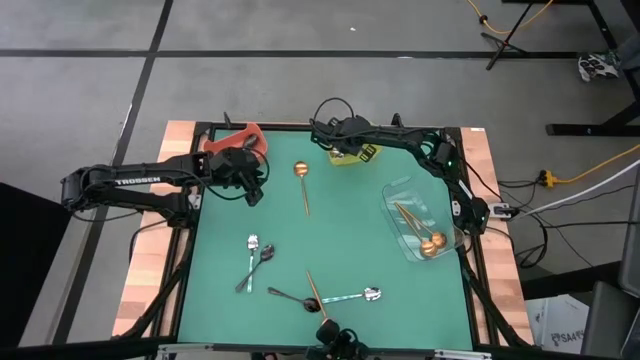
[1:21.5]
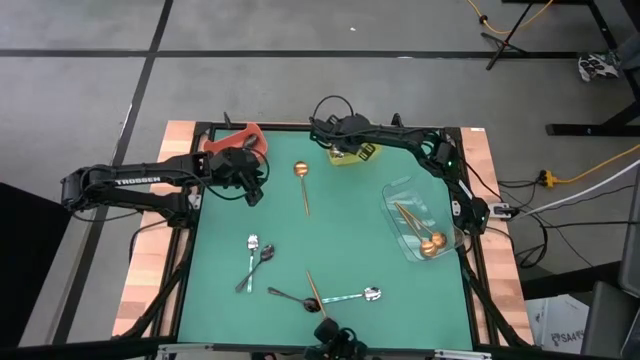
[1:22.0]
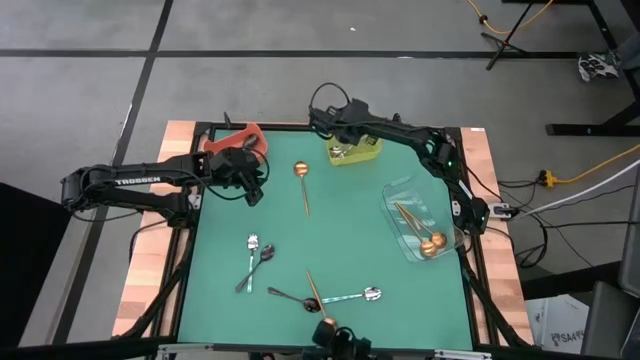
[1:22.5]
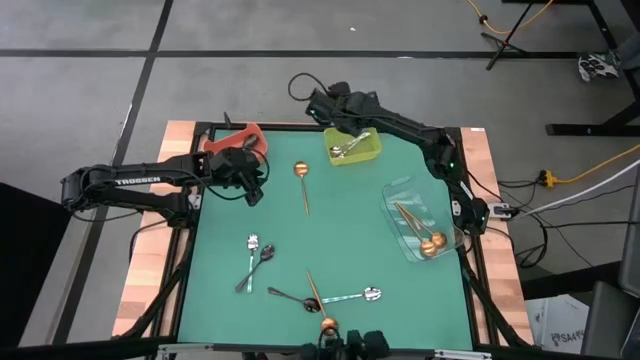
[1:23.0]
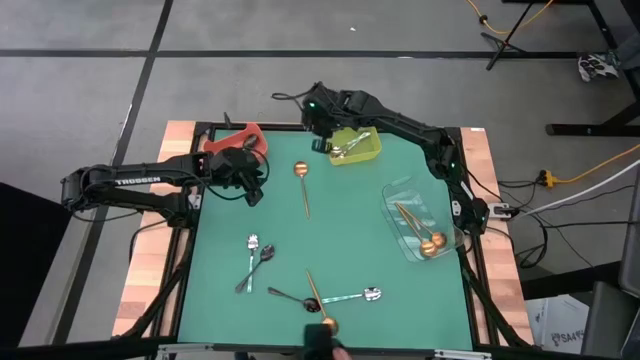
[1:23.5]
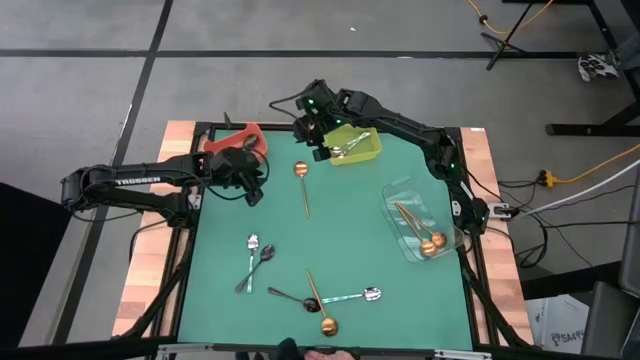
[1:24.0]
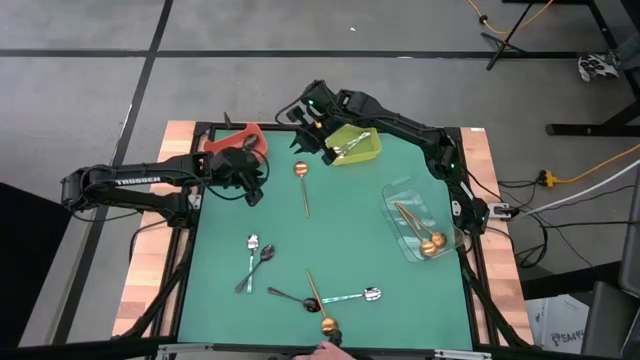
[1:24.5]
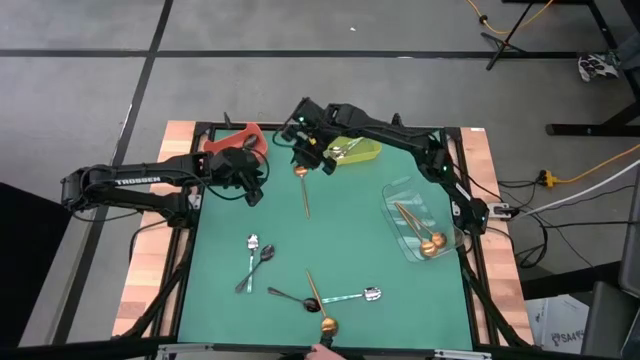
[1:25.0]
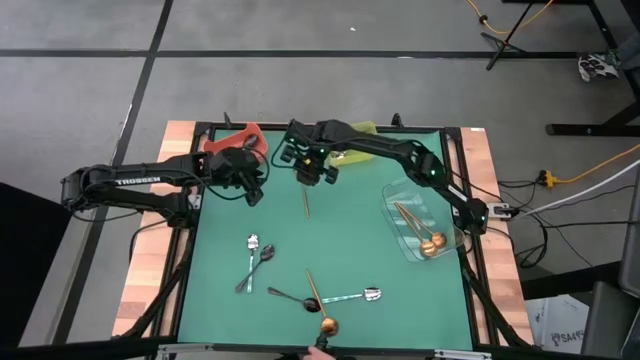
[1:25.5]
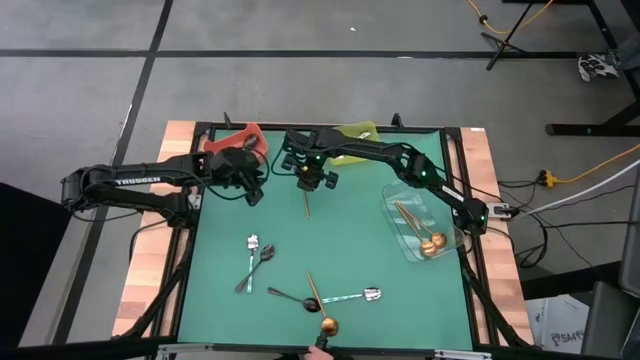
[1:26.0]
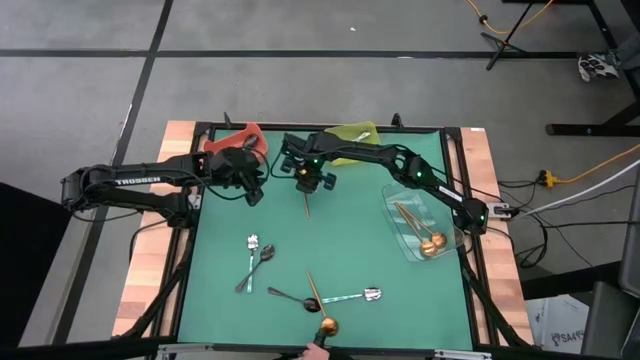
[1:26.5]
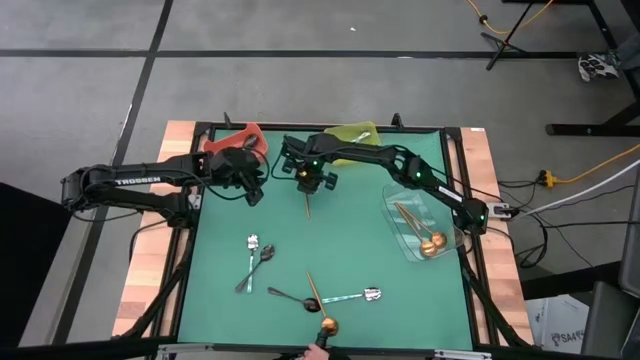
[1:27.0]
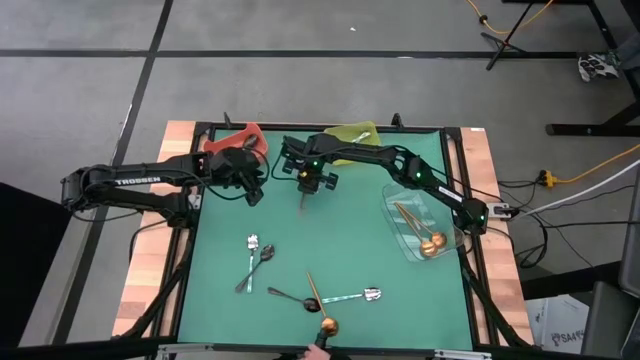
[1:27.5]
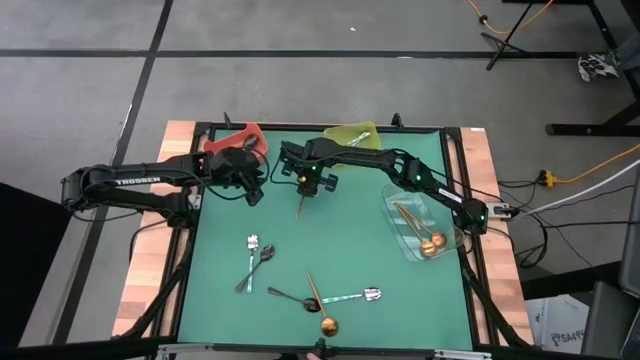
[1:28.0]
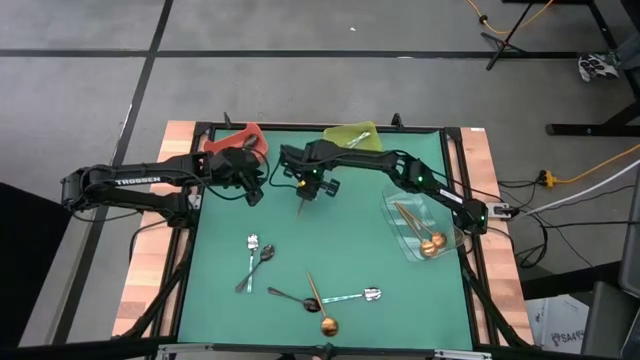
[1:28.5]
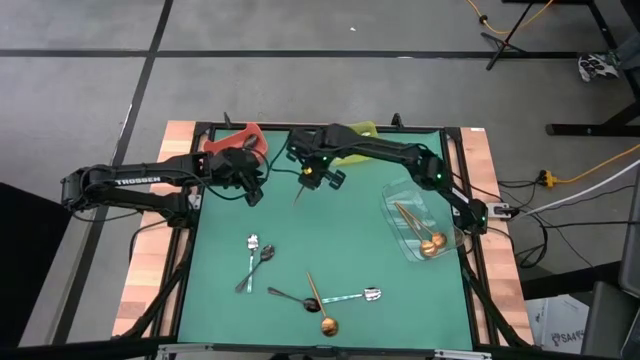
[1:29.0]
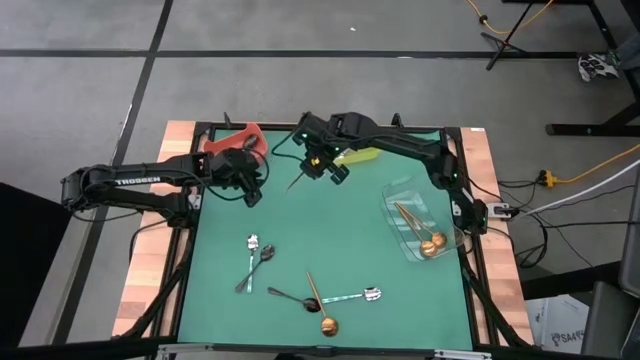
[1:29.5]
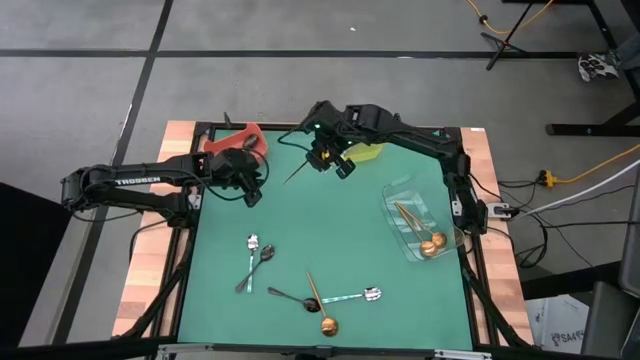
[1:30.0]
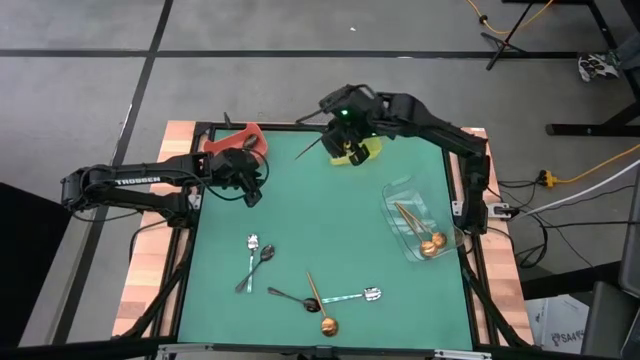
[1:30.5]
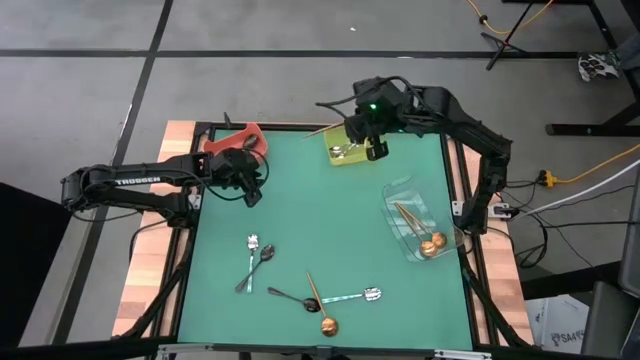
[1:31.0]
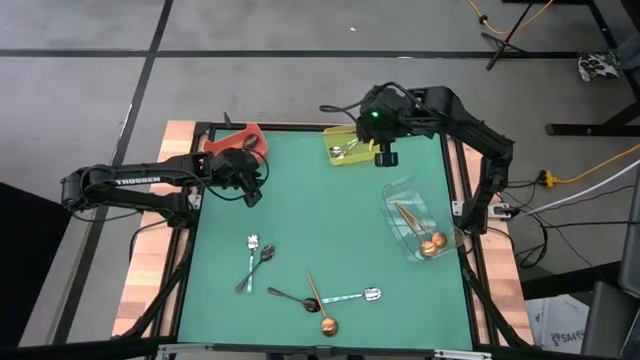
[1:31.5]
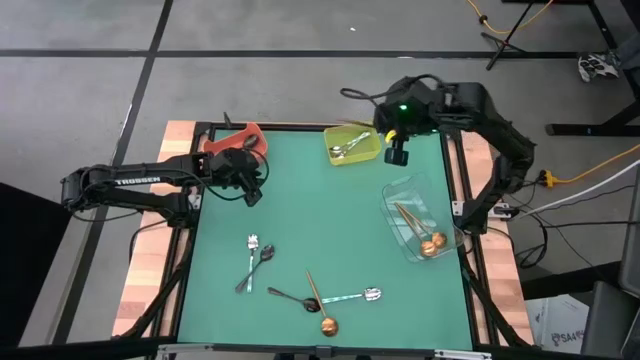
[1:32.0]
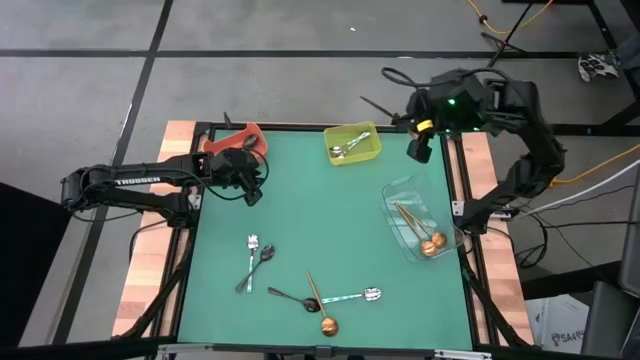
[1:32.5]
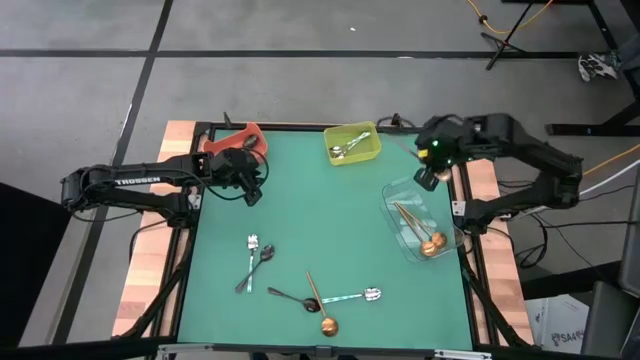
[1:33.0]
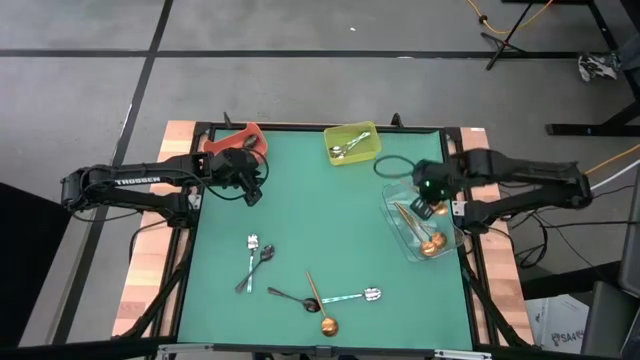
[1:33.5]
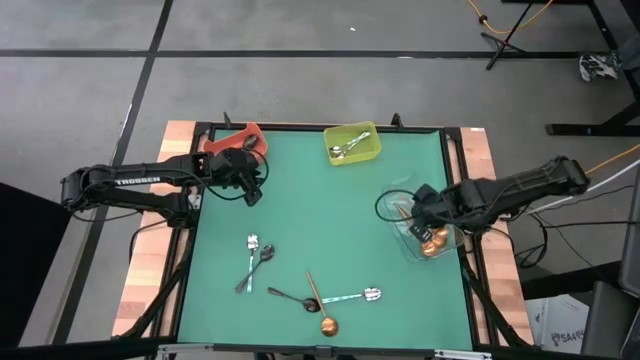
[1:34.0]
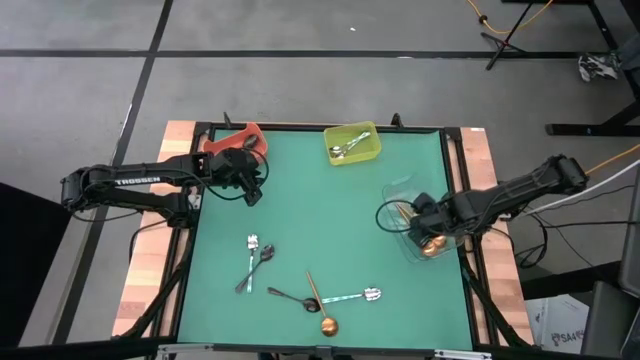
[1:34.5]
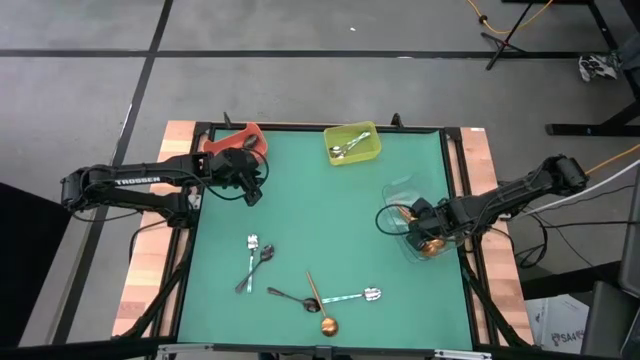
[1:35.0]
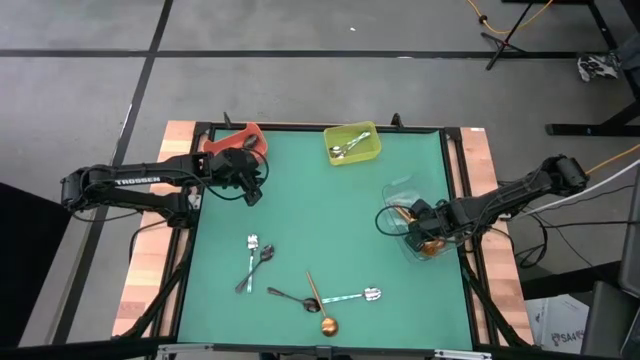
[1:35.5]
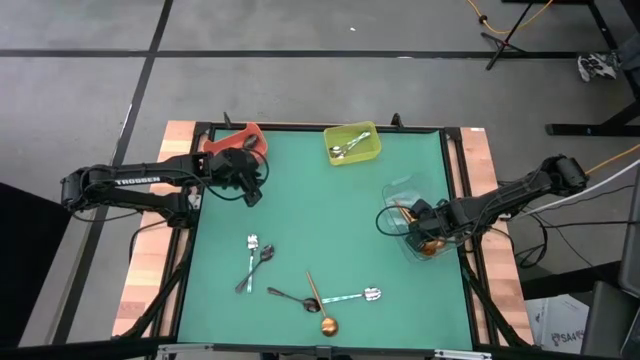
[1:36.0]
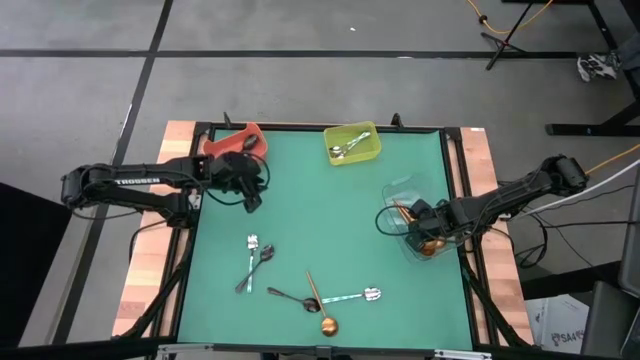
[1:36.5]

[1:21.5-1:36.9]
Task: Sort silverware by color (type)
Put the top gold spoon into the transparent bin

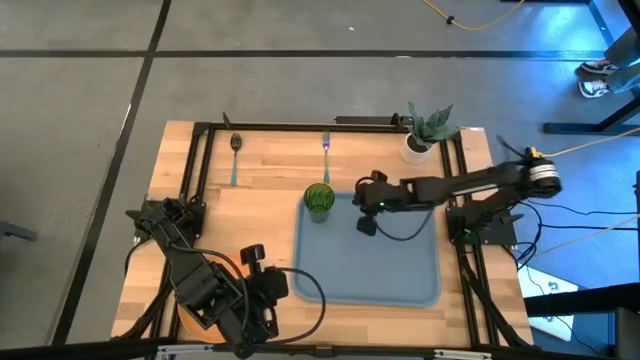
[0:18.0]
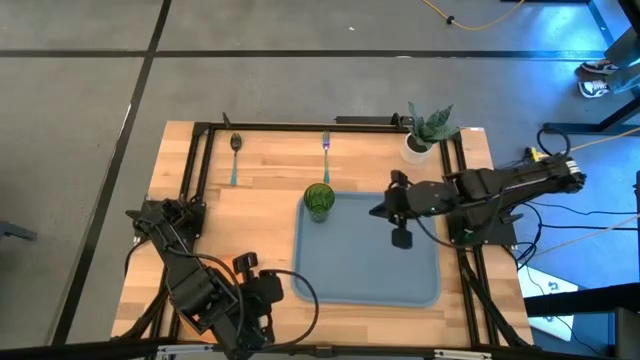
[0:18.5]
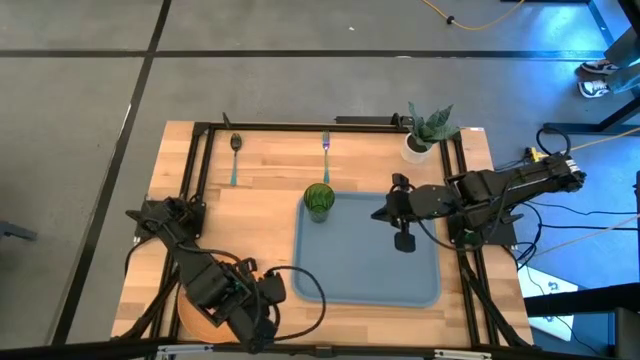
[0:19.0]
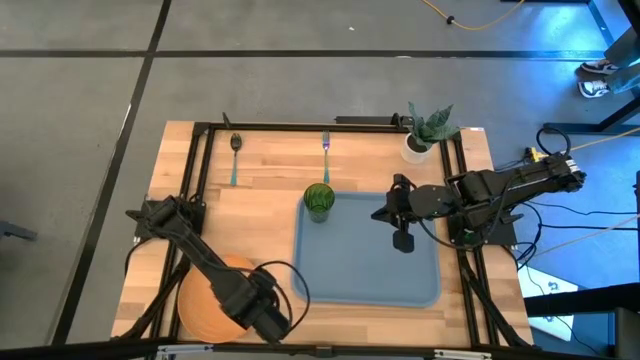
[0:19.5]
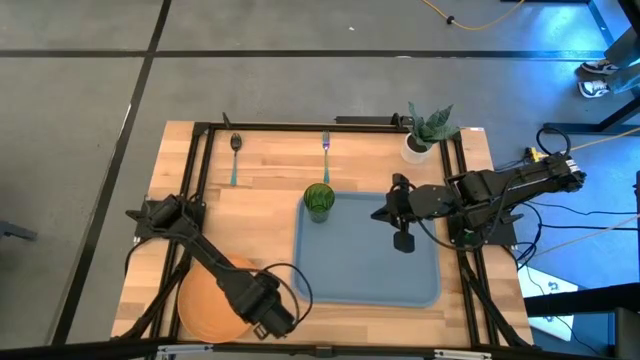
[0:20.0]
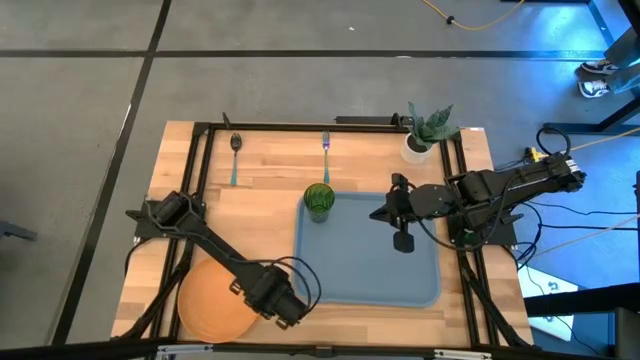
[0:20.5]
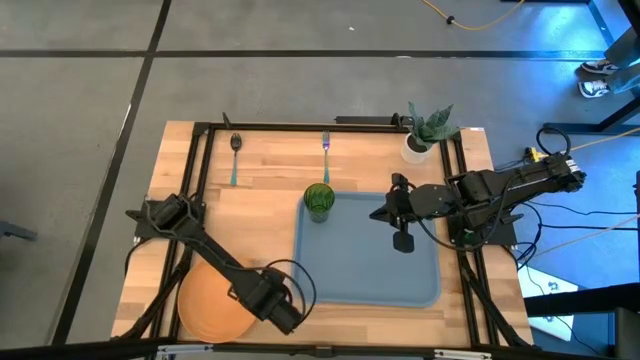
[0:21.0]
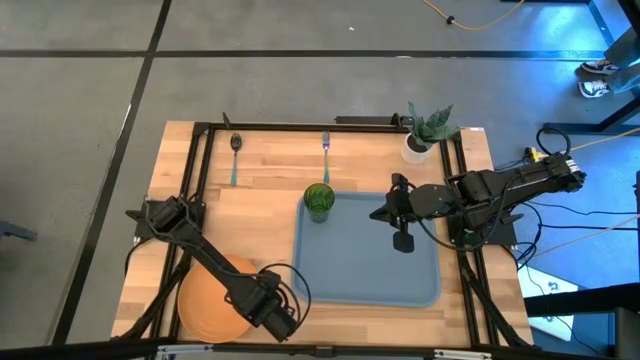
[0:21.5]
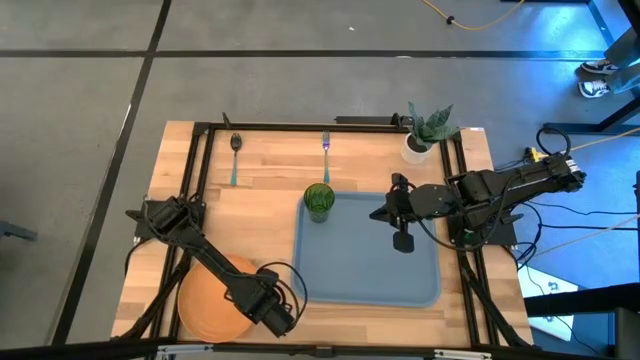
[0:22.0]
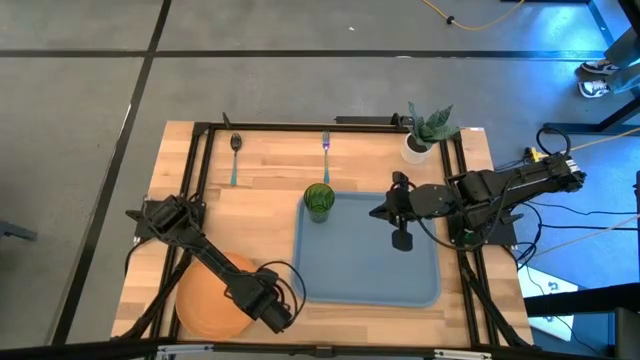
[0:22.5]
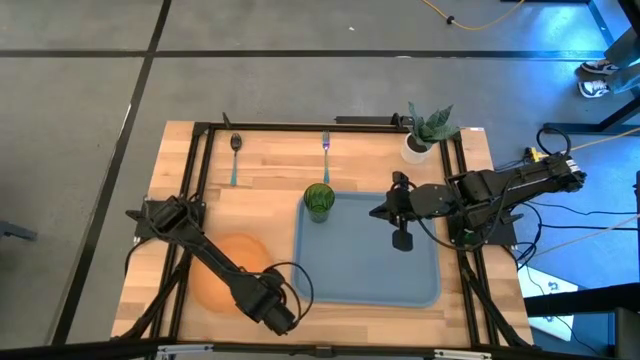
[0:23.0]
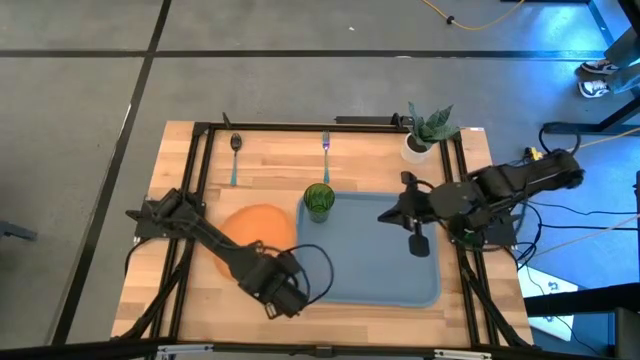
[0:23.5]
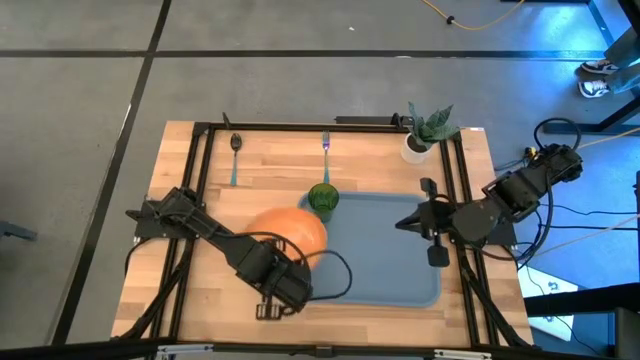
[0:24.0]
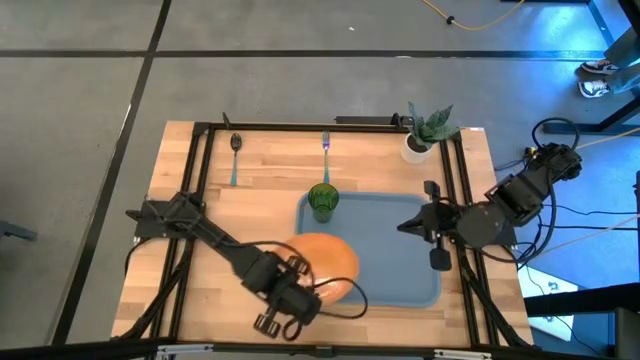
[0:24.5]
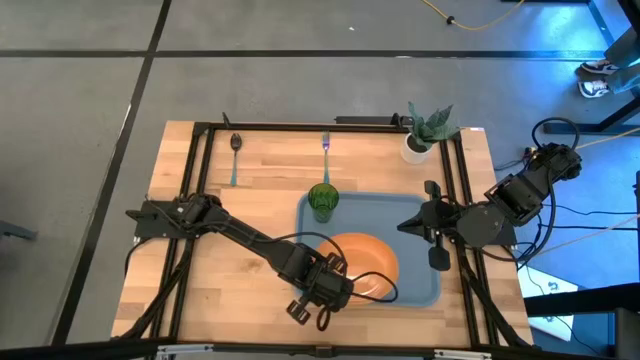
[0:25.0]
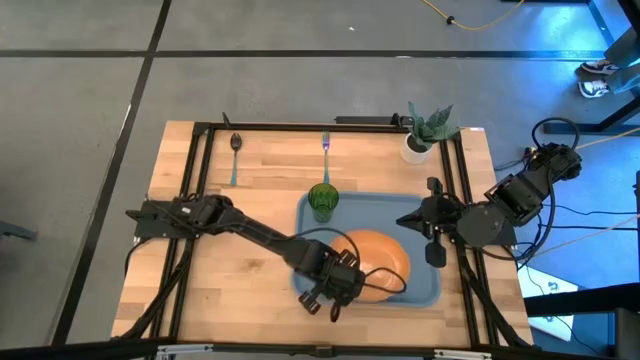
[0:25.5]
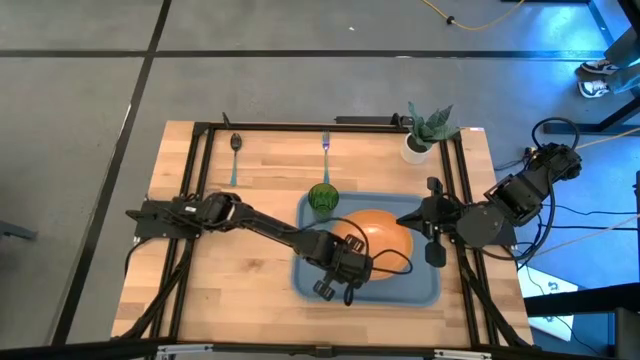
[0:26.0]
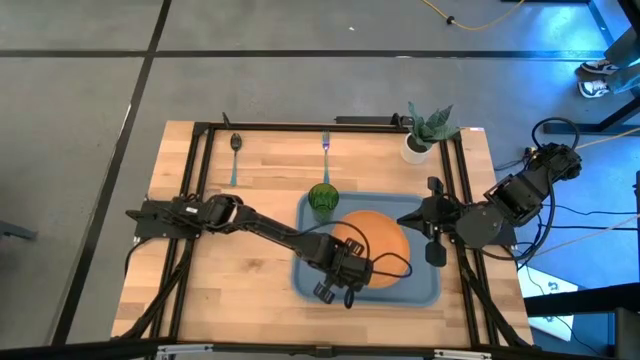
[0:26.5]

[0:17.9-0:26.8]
Task: Pick and place plate/cup/fork/spoon on tray
Put the orange plate on the blue tray to the right of the green cup
